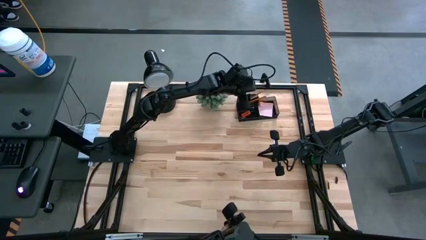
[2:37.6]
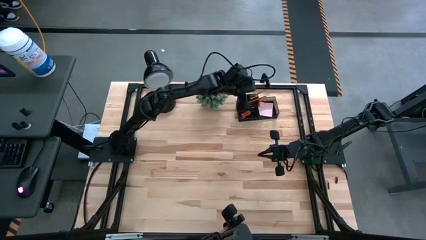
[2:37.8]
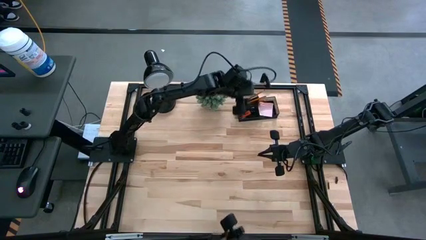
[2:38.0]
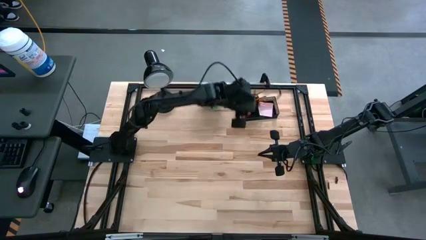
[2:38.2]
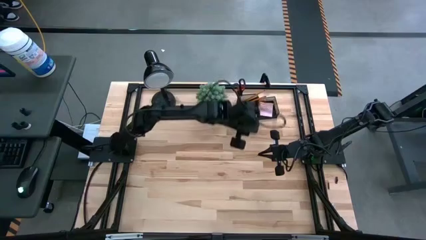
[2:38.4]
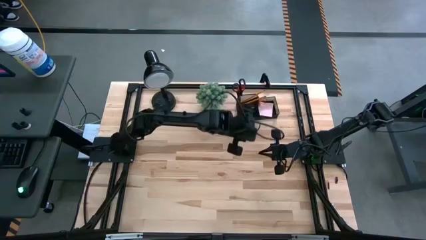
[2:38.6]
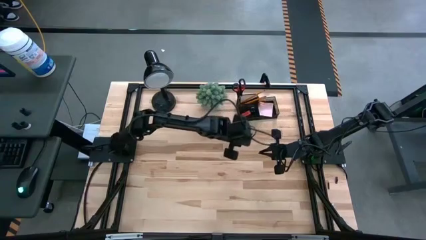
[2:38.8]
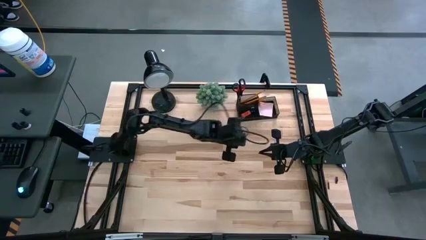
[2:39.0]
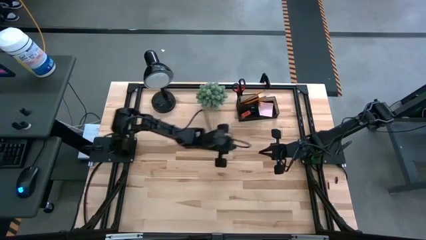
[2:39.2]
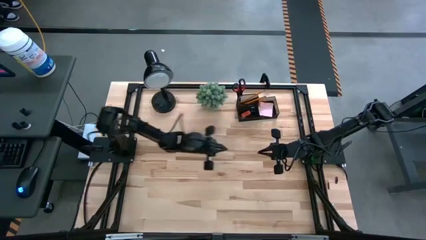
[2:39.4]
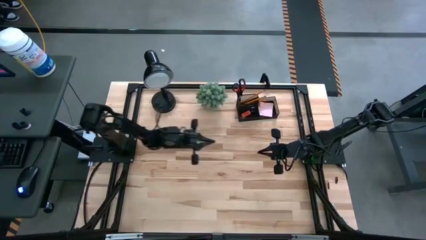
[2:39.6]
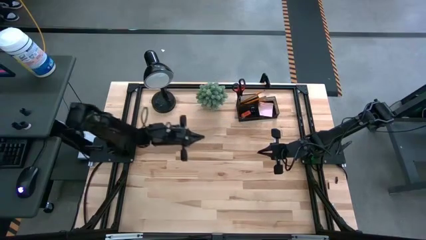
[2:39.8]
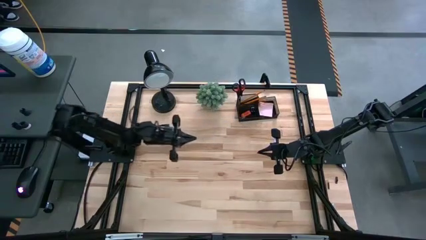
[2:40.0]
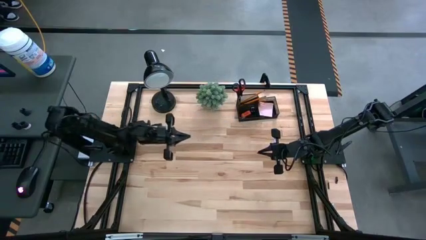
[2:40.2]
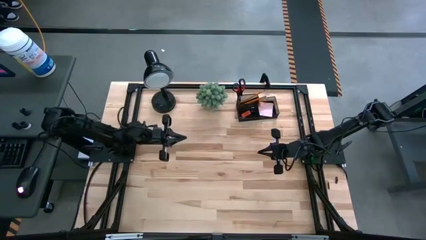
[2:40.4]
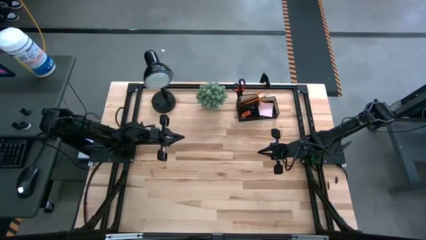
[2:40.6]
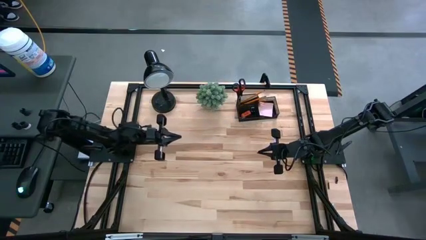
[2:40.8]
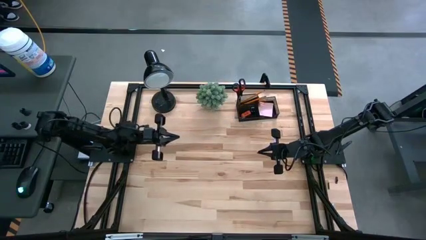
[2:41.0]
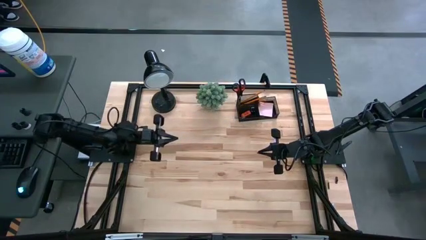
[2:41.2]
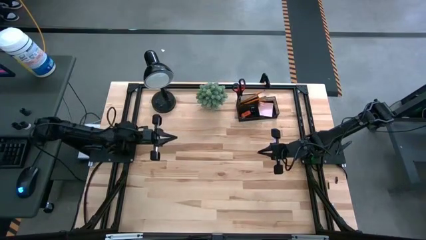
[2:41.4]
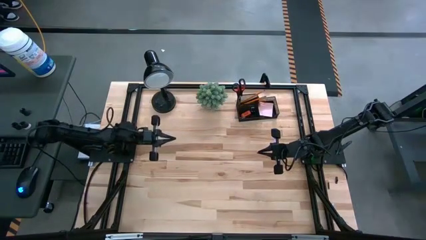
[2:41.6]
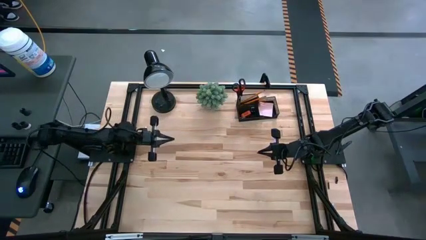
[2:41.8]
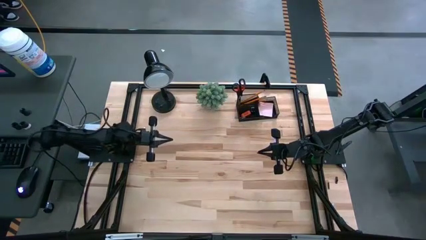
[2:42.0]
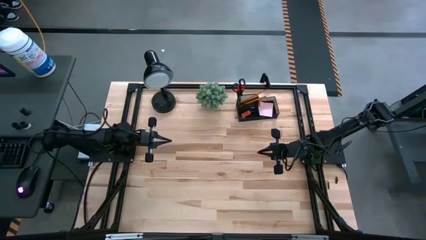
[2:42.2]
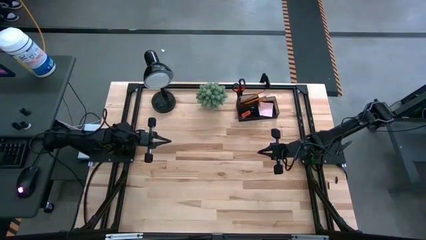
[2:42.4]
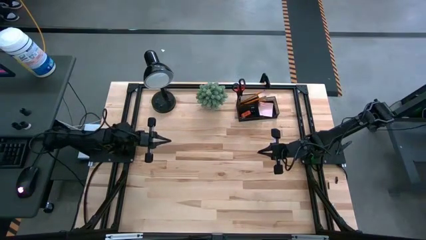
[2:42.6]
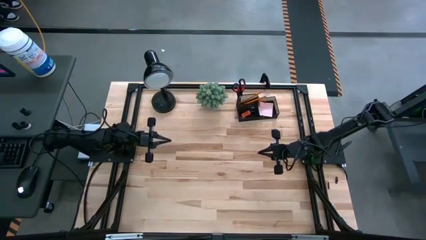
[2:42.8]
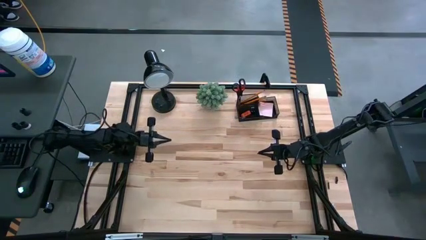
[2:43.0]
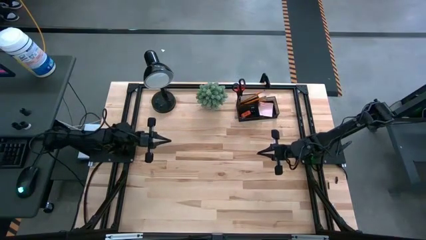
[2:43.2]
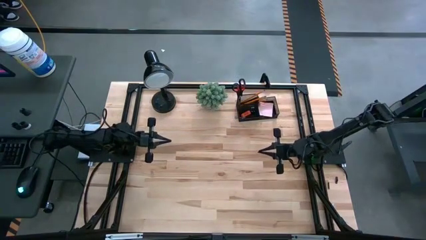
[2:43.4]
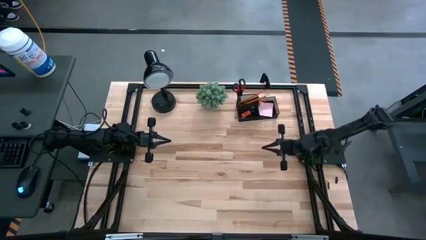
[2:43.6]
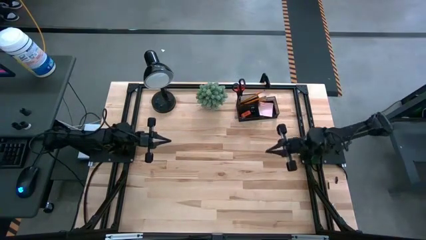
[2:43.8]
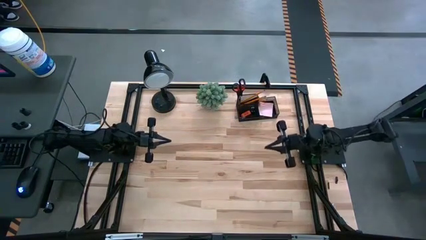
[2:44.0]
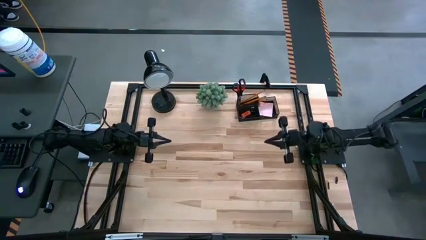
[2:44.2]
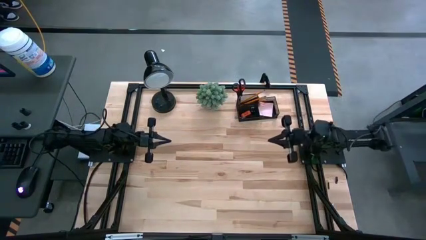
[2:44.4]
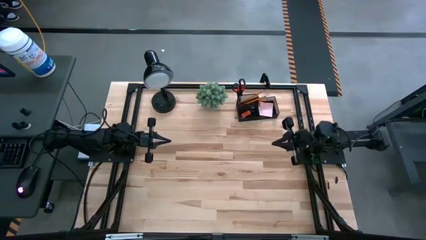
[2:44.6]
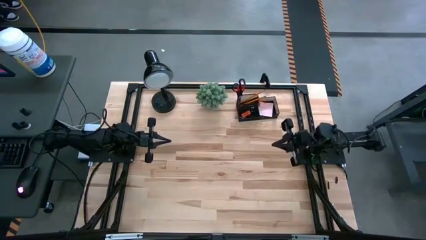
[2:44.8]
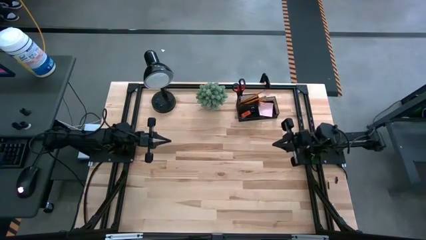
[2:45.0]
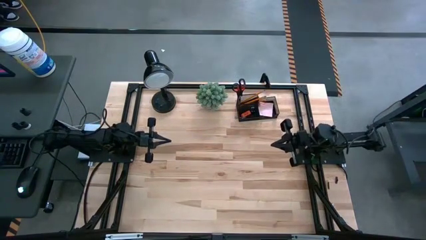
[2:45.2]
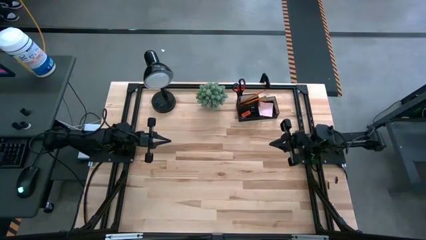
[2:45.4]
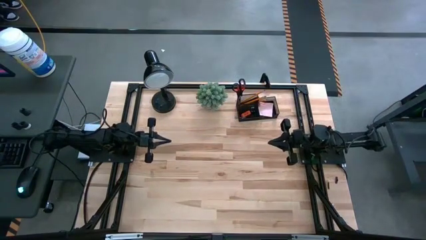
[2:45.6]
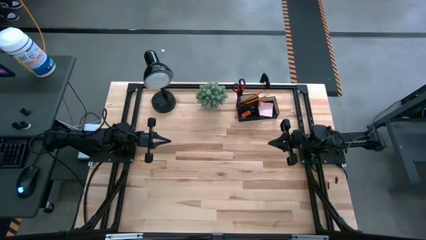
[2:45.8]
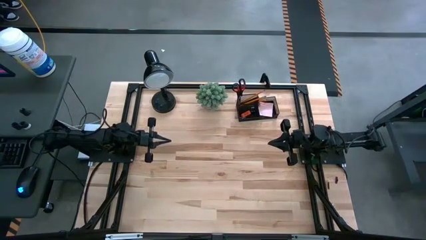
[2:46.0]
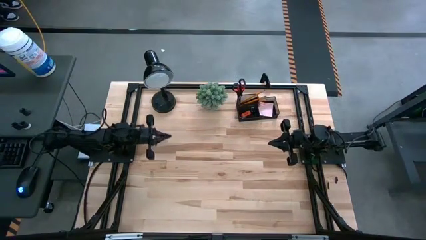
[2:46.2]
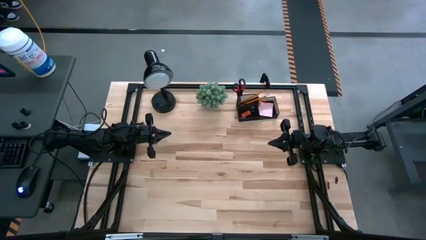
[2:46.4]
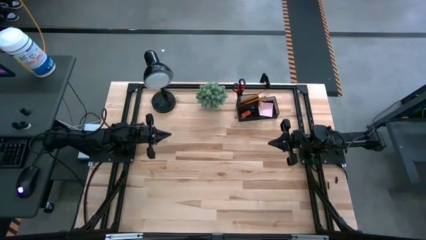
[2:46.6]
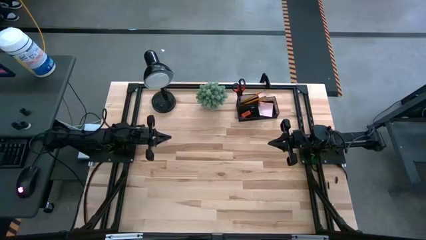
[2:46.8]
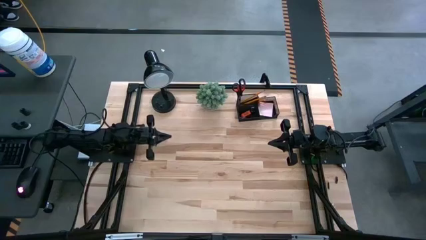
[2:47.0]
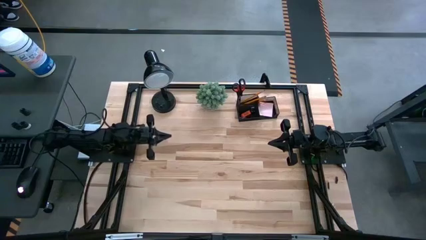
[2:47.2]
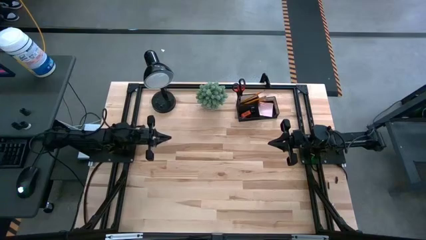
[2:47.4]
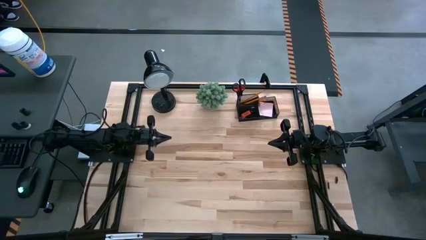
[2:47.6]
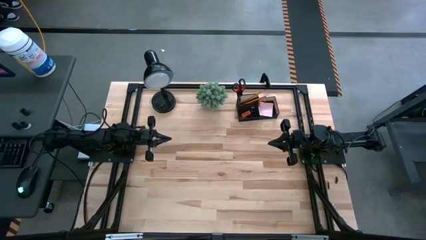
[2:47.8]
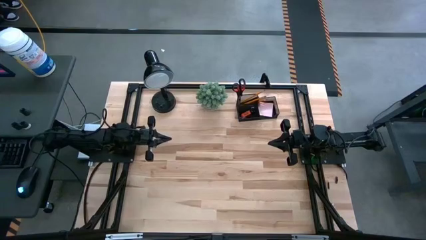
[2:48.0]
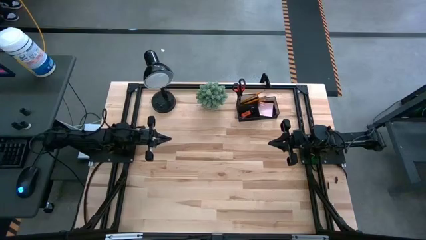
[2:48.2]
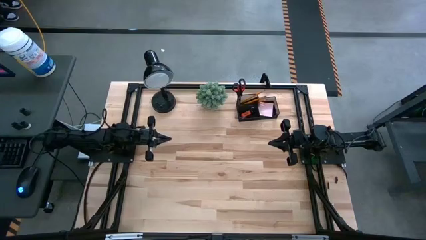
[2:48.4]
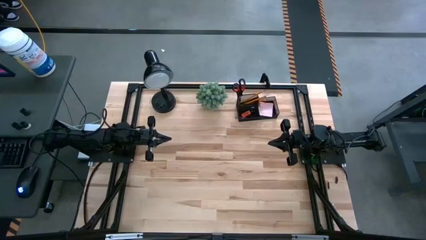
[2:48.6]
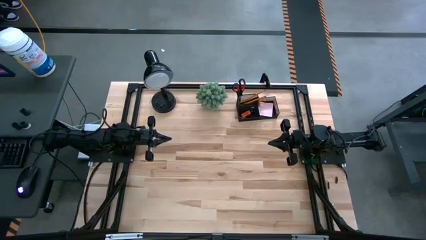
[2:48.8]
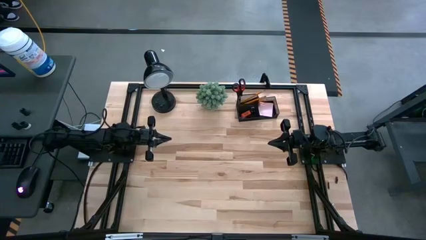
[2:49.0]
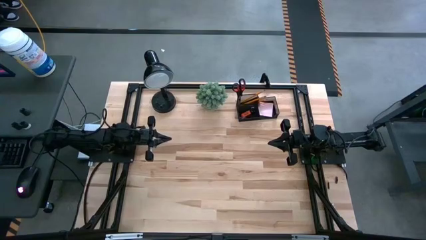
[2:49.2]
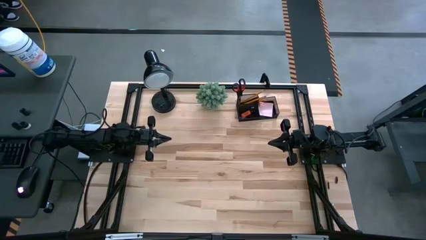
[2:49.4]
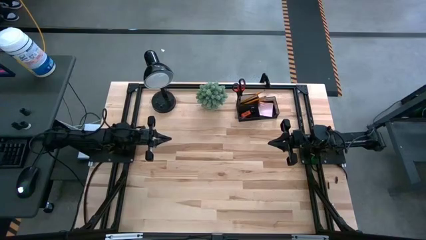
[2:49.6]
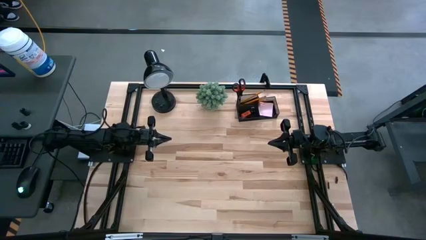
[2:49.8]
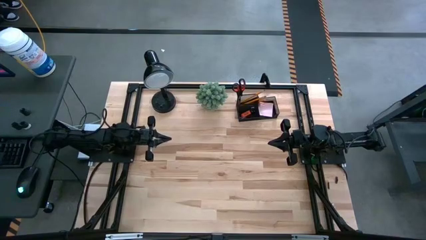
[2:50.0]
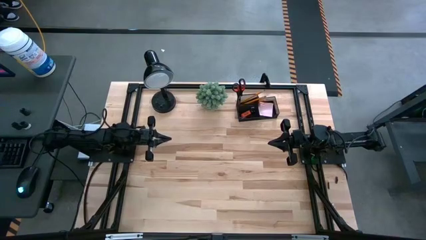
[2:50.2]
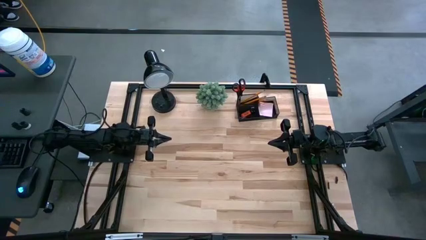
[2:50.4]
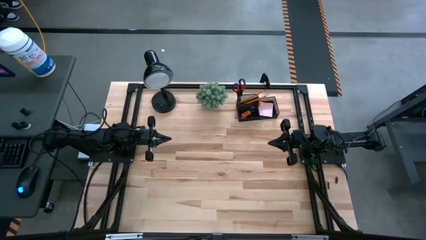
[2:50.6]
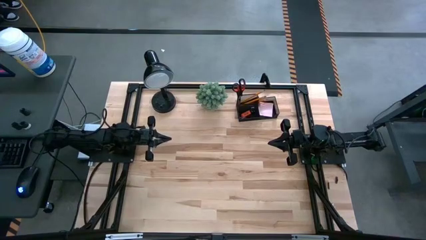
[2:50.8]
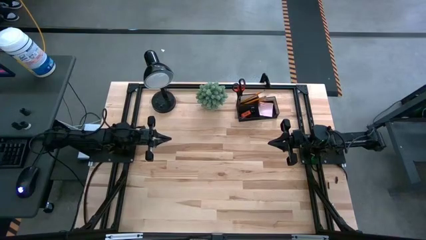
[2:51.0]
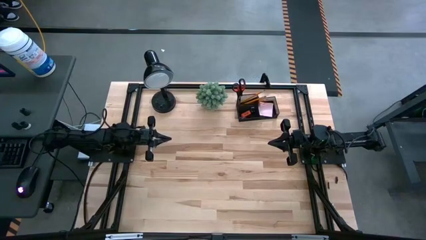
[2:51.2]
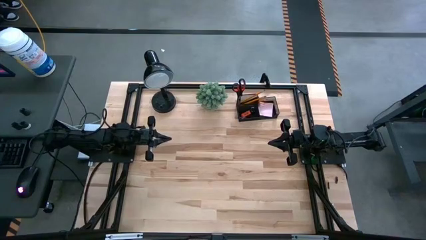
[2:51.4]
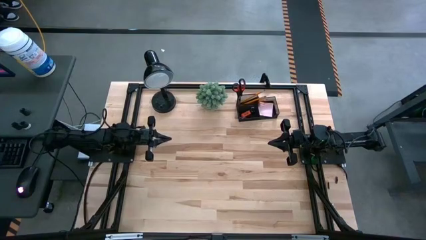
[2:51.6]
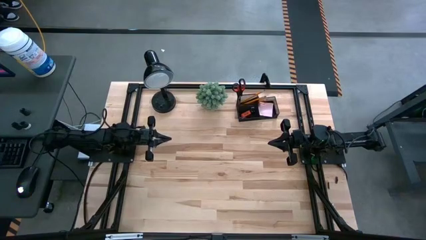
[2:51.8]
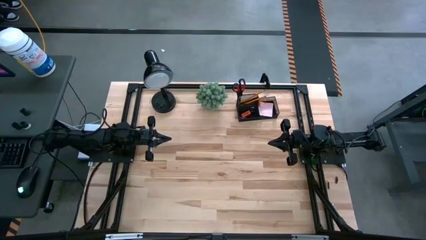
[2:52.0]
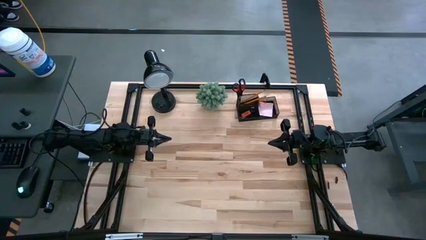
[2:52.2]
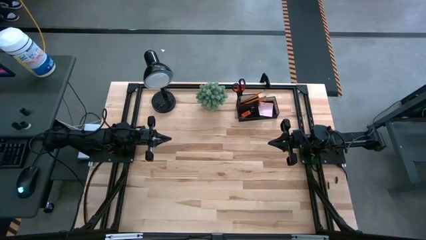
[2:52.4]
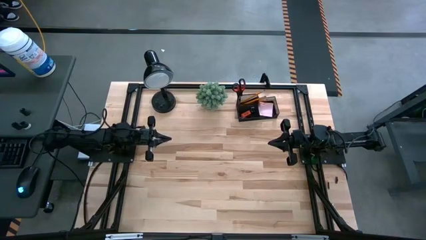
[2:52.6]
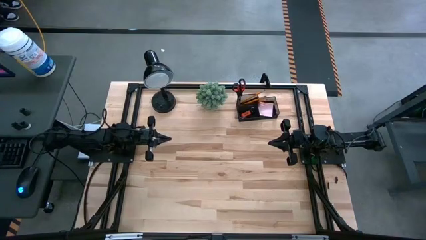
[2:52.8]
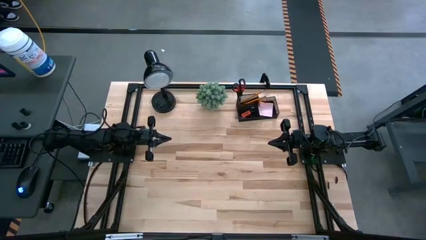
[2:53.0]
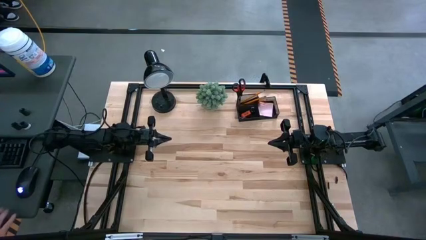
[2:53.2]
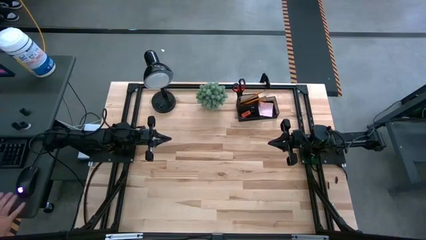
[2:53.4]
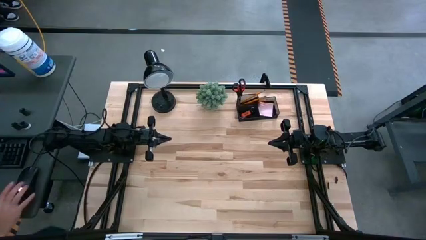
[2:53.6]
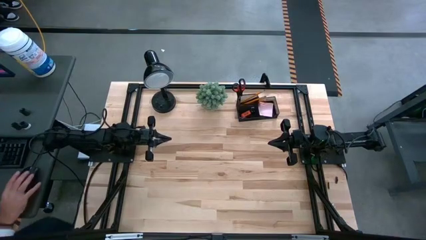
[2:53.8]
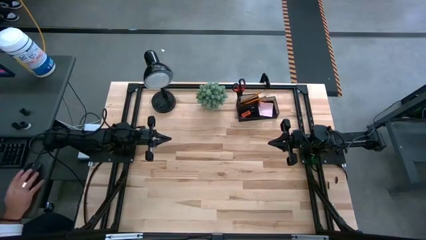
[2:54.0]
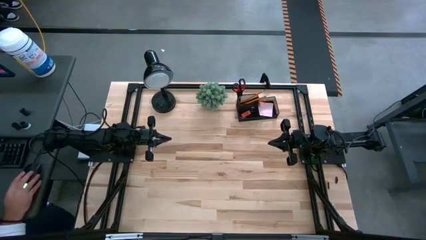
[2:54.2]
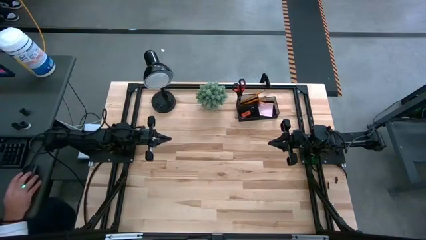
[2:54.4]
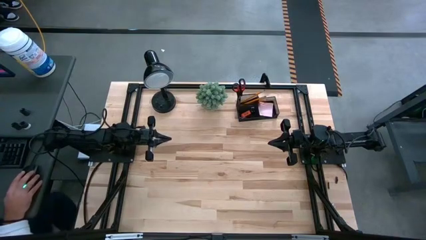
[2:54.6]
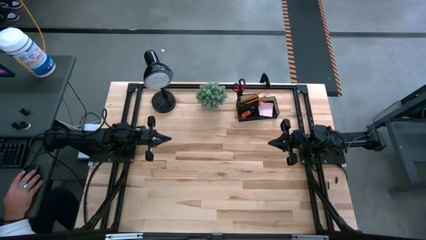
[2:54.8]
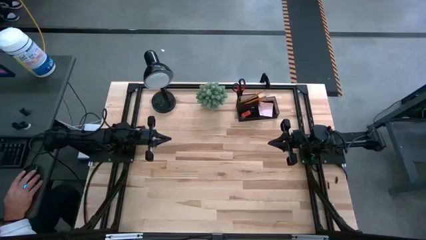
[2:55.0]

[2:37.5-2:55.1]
Task: Pick and place office supplies into organizer
Return To Home Position
